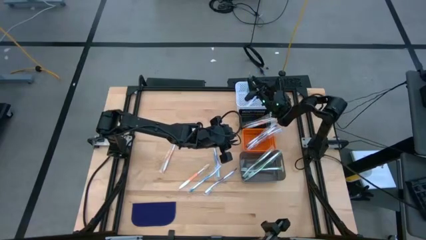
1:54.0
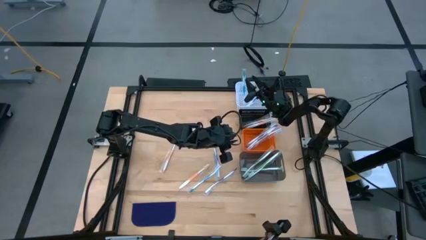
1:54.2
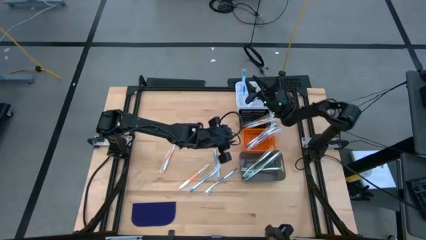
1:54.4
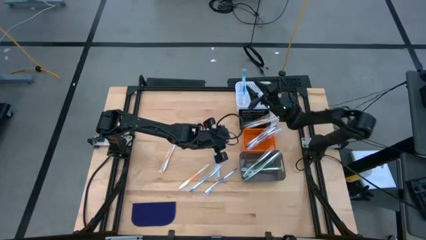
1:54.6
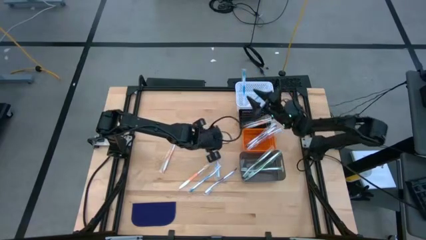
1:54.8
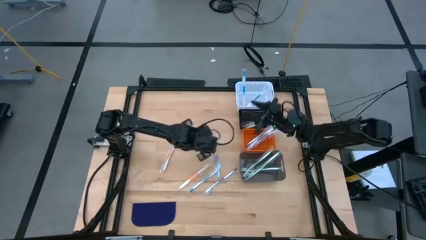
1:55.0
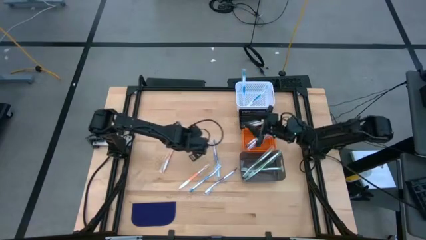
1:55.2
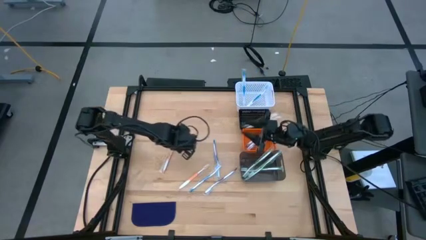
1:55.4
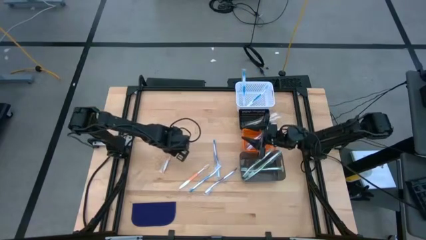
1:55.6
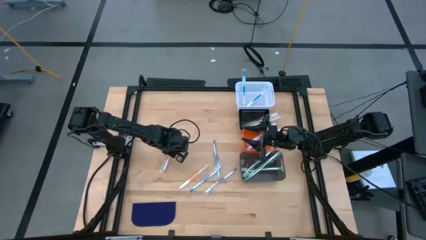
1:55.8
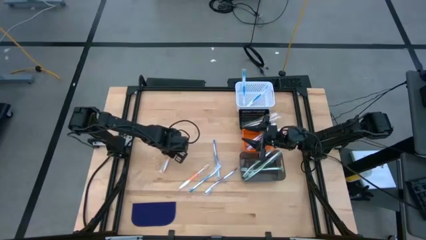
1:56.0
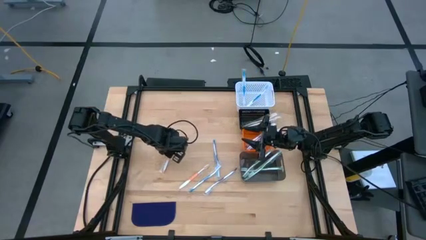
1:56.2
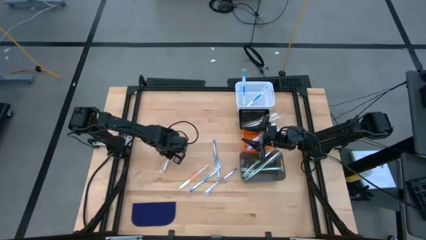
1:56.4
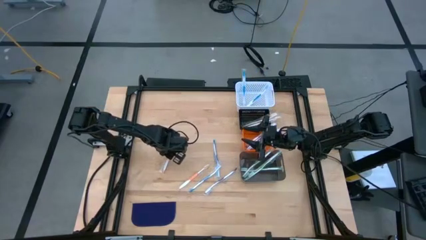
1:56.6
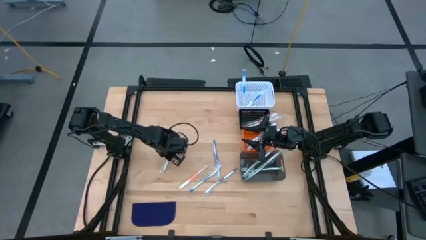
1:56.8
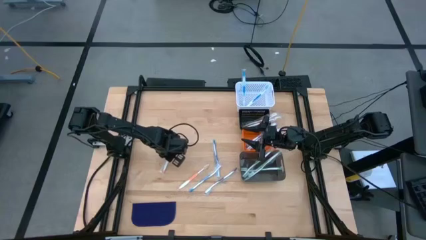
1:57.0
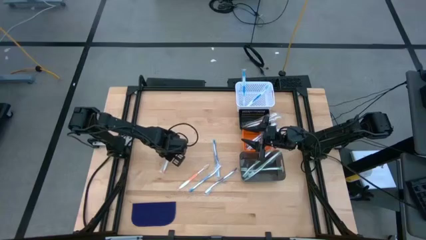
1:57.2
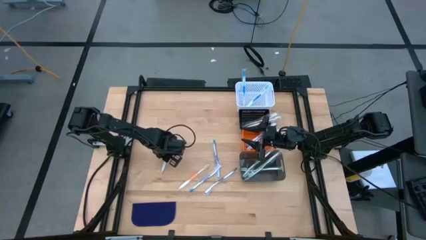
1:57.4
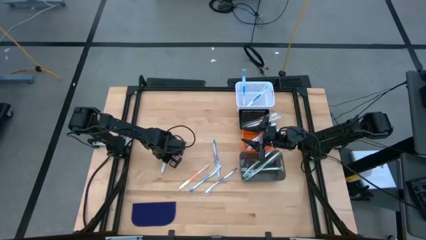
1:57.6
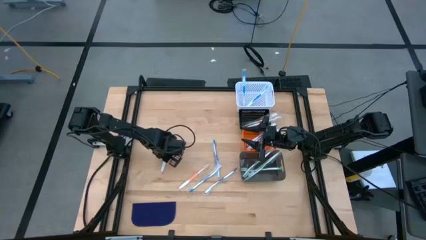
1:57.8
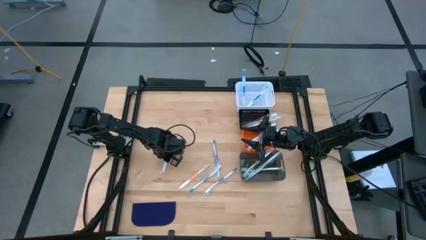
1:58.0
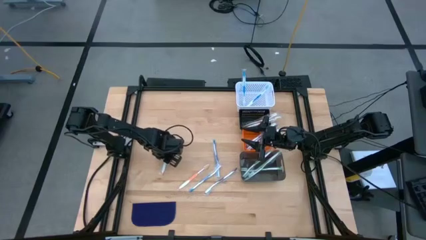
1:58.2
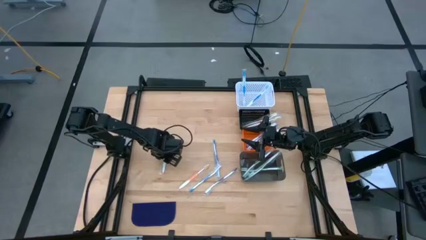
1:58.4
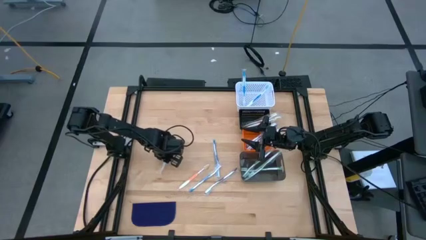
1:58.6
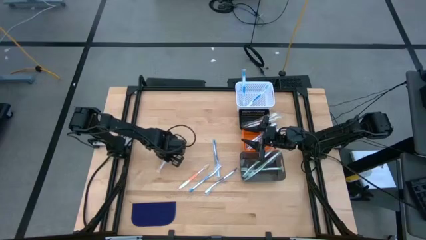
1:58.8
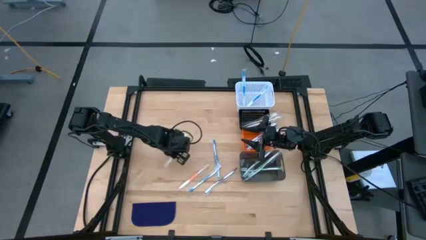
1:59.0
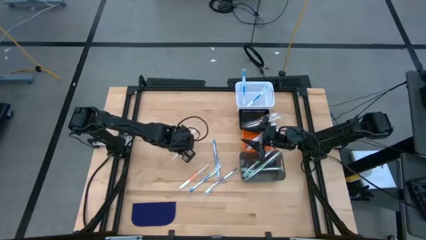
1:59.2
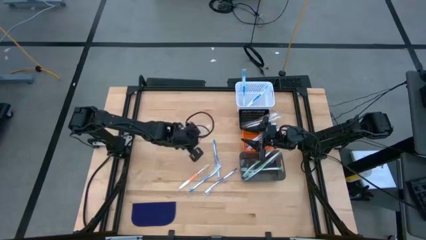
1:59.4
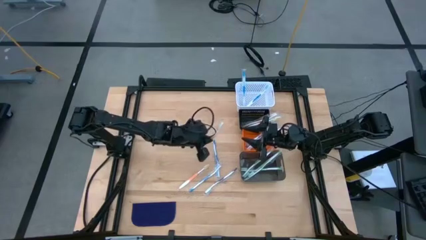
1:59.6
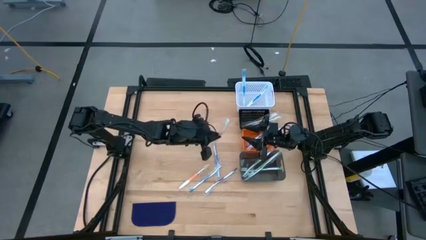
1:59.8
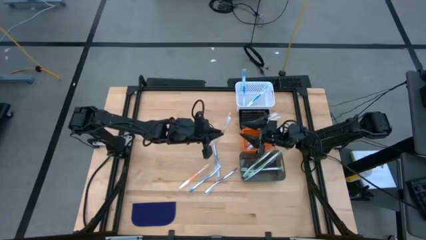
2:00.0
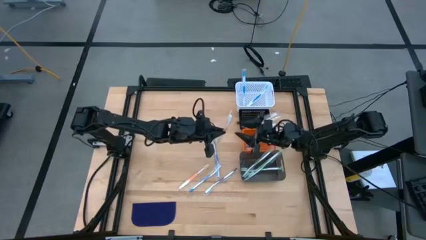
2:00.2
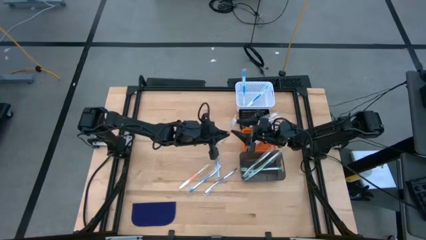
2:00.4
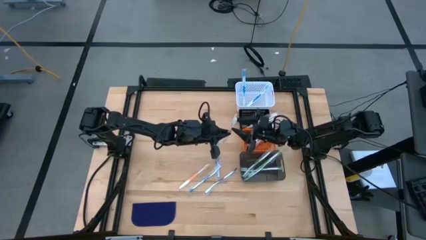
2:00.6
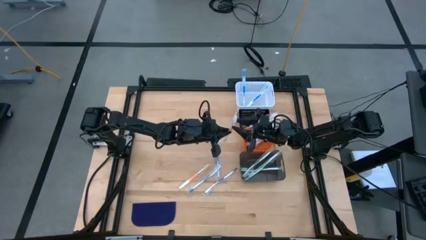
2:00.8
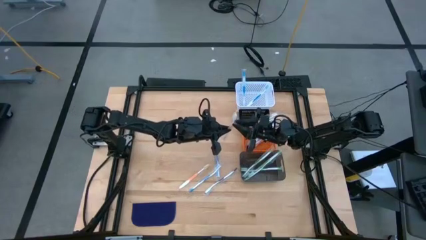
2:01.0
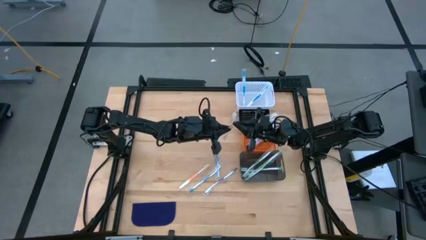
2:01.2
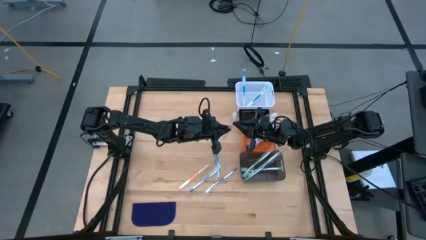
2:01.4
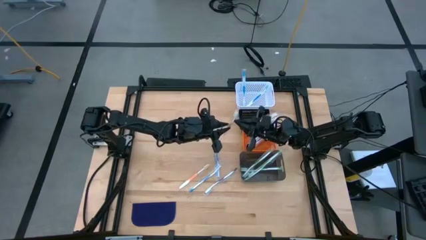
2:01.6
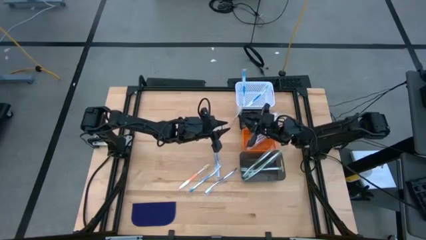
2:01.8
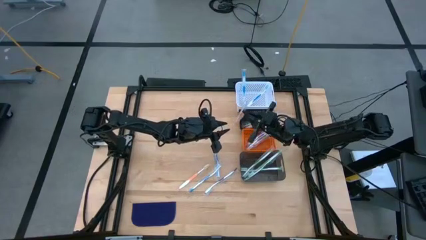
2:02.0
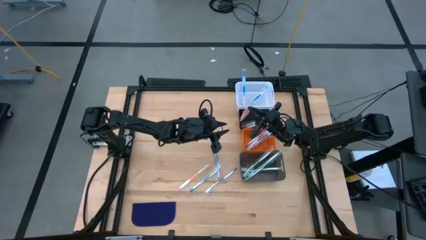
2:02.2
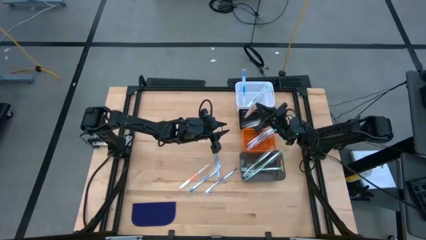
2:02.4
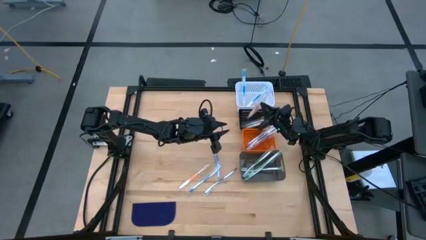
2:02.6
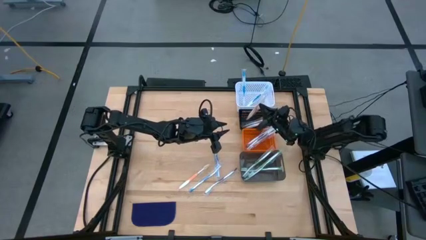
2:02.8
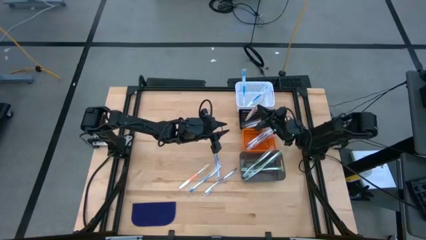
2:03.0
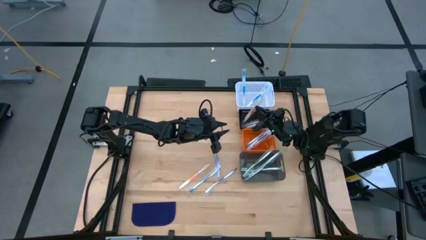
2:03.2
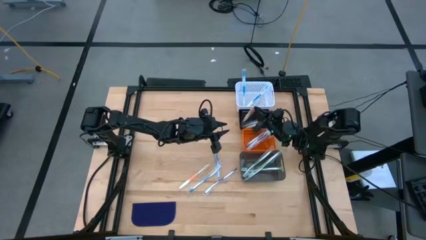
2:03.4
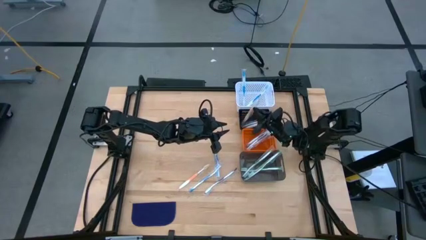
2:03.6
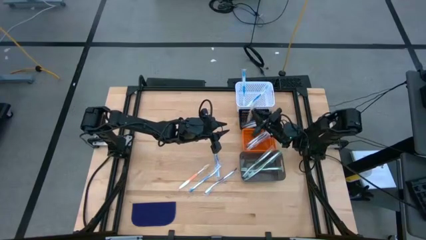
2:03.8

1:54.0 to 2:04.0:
Task: Pick & Place Toothbrushes
Put the orange toothbrush into the black bin

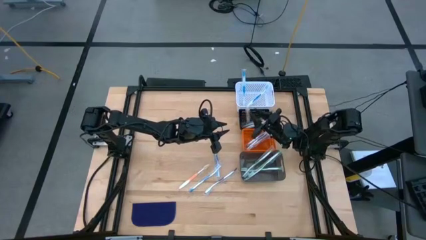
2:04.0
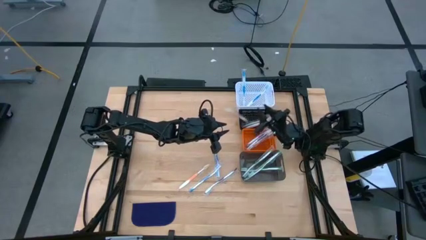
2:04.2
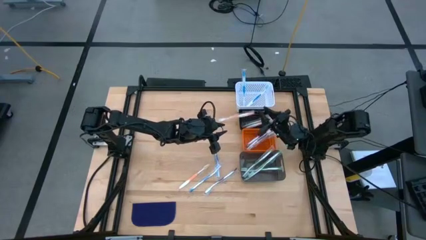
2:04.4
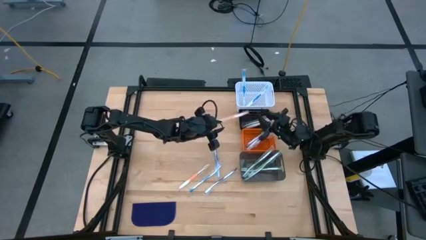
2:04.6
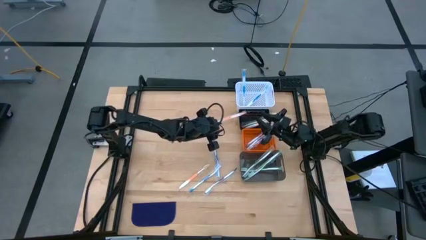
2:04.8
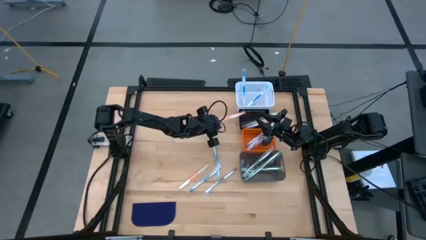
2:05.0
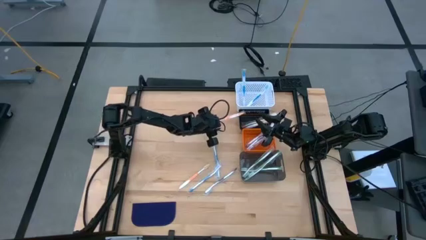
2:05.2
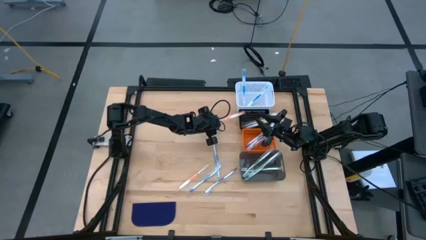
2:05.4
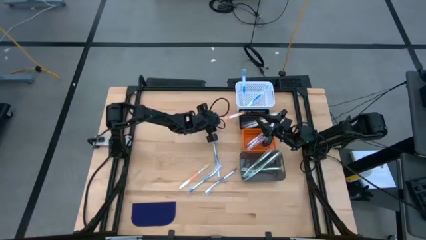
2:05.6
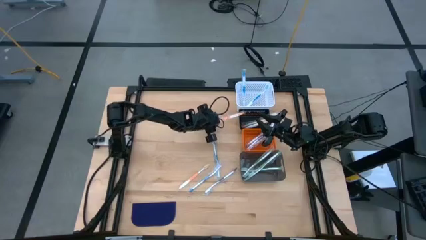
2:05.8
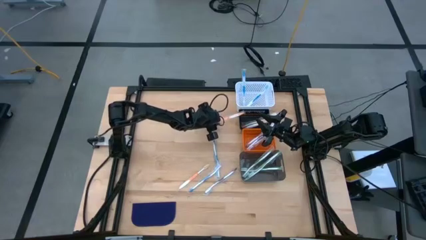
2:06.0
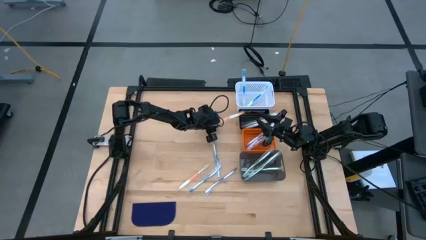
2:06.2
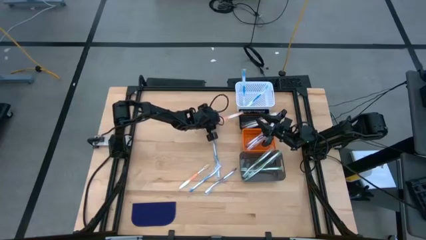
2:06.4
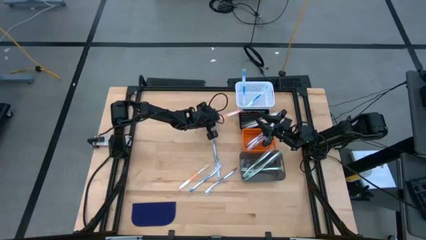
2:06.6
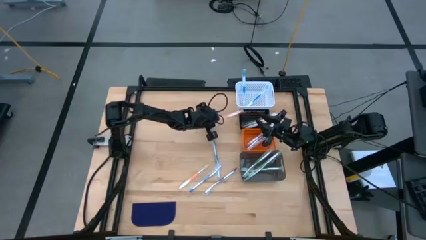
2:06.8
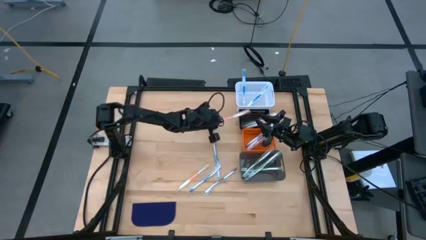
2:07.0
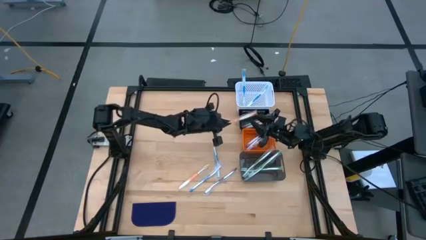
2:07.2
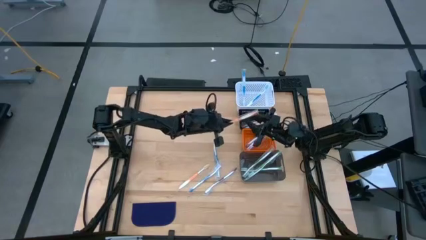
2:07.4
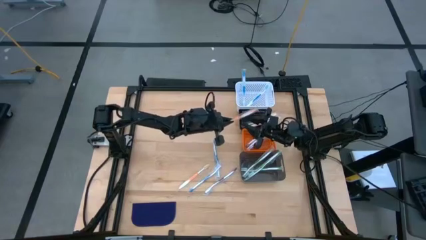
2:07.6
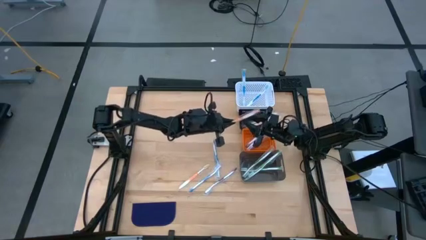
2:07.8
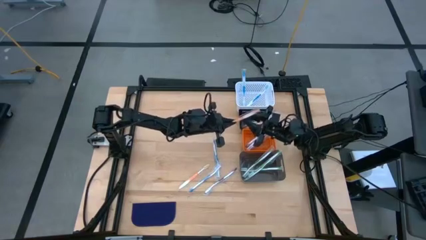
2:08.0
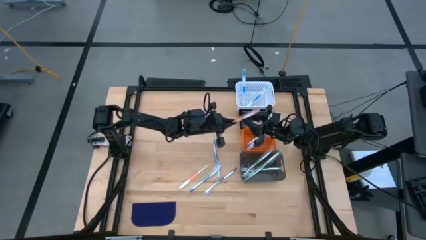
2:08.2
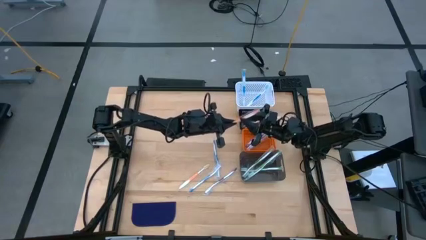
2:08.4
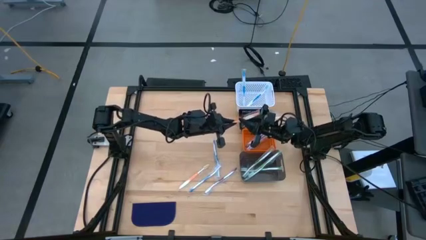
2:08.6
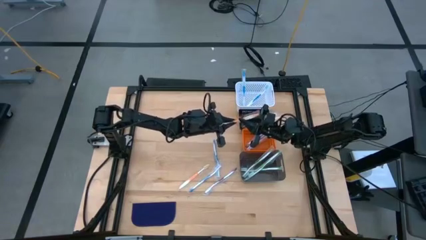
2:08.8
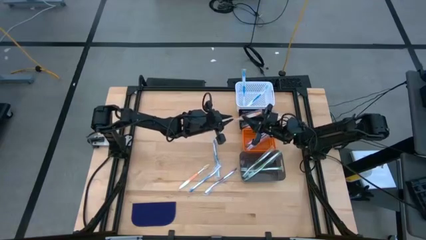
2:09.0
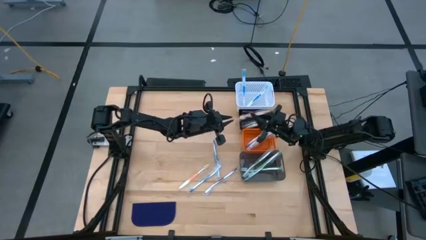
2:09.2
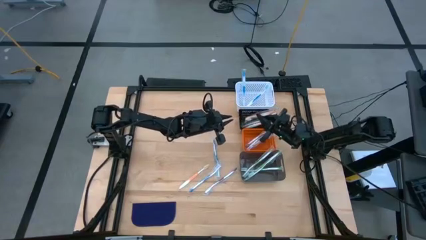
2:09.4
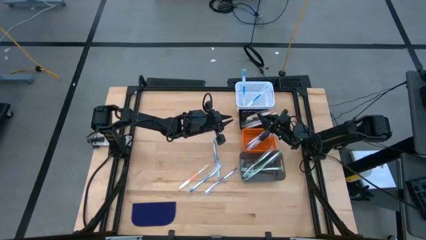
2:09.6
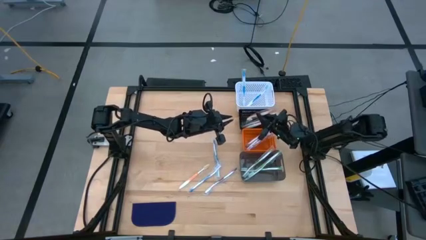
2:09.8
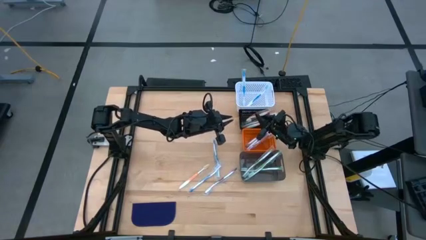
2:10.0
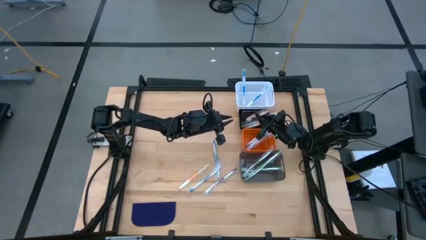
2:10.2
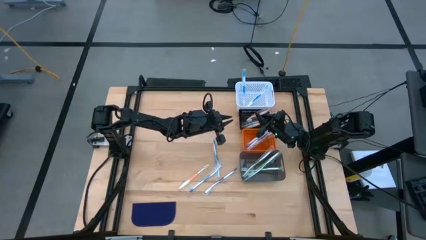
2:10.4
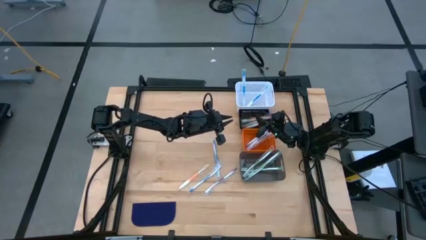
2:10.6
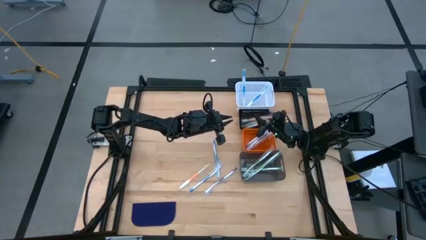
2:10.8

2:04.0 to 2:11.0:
Put the orange toothbrush into the black bin
